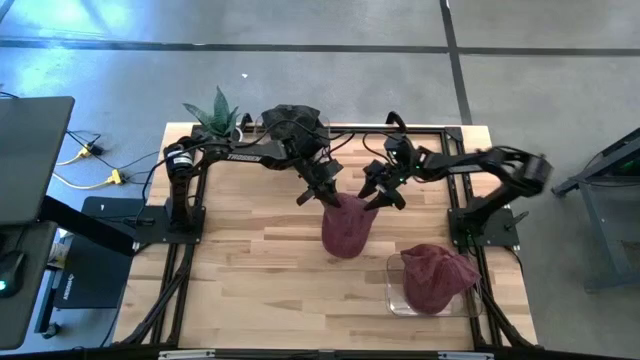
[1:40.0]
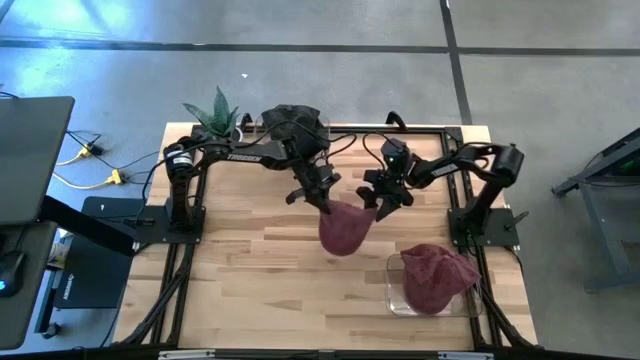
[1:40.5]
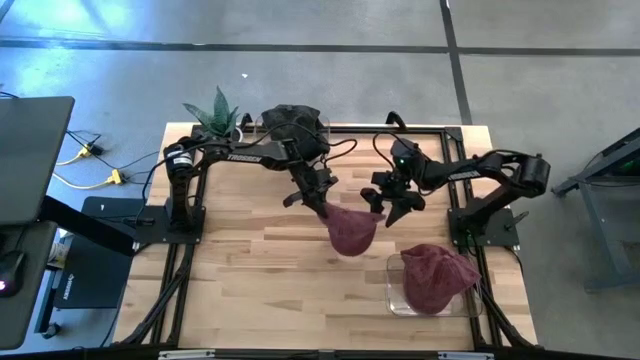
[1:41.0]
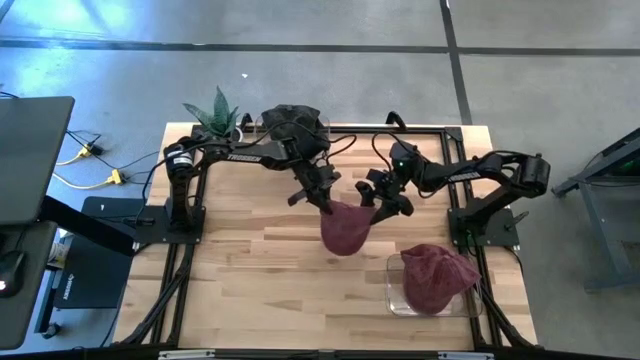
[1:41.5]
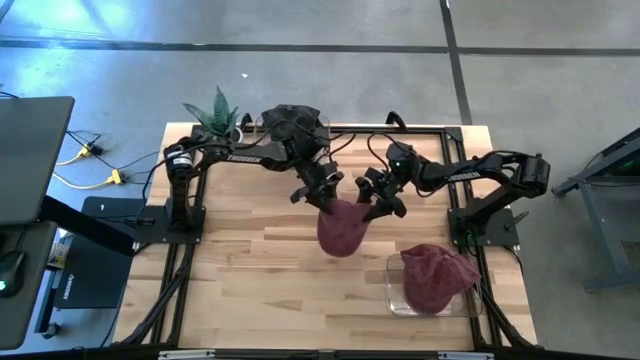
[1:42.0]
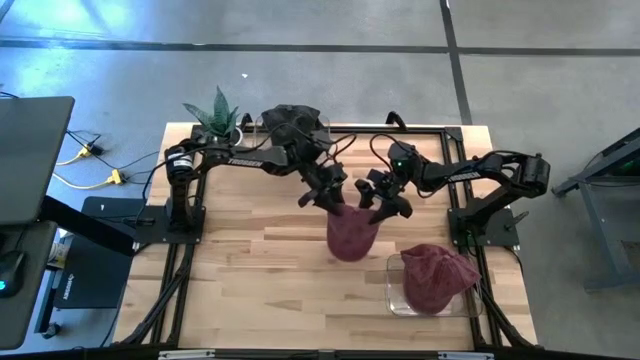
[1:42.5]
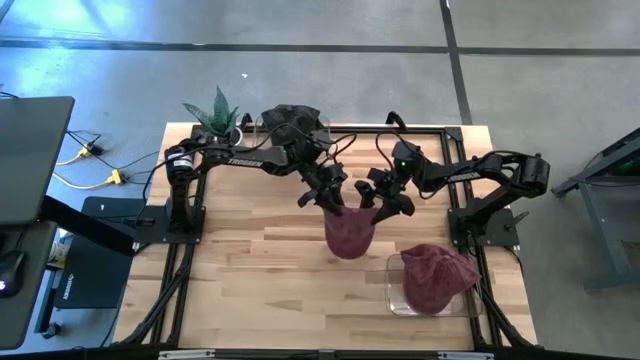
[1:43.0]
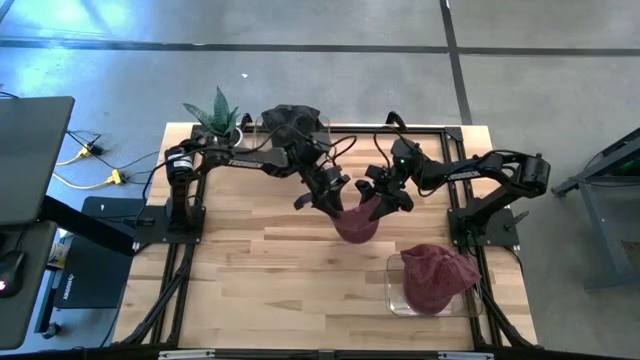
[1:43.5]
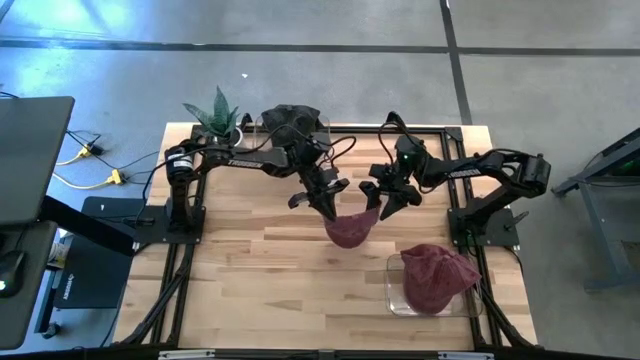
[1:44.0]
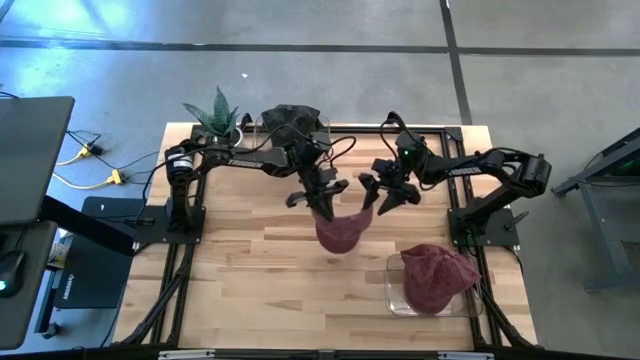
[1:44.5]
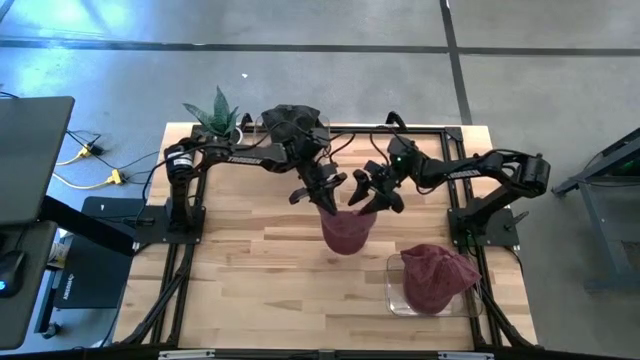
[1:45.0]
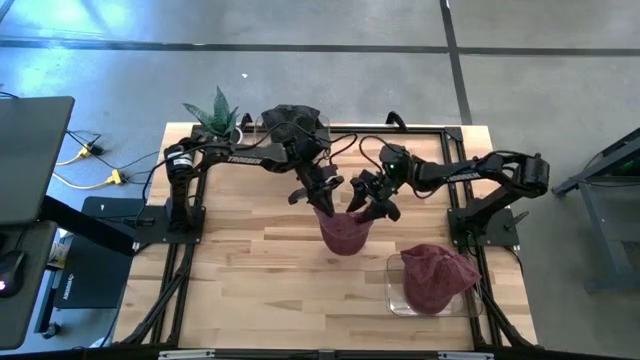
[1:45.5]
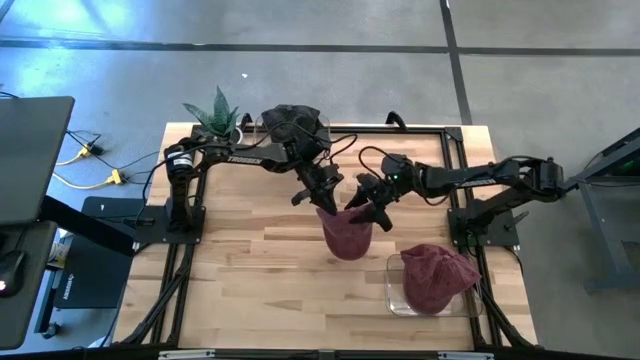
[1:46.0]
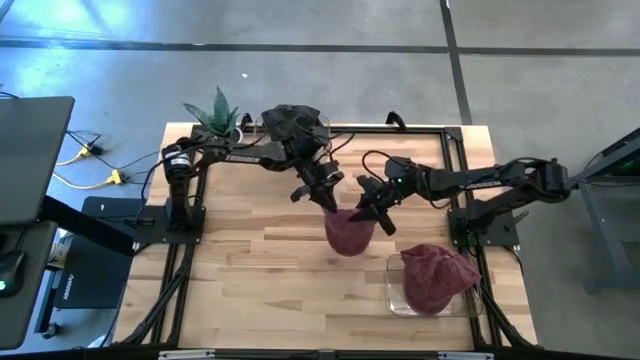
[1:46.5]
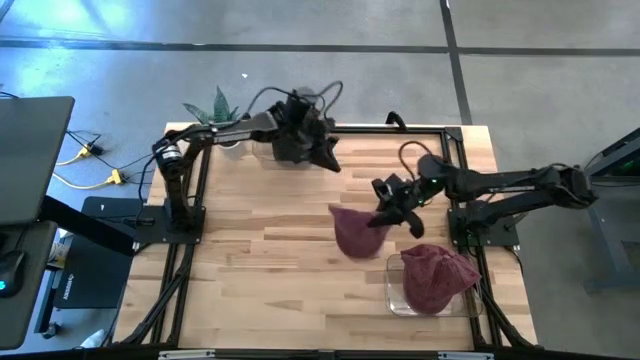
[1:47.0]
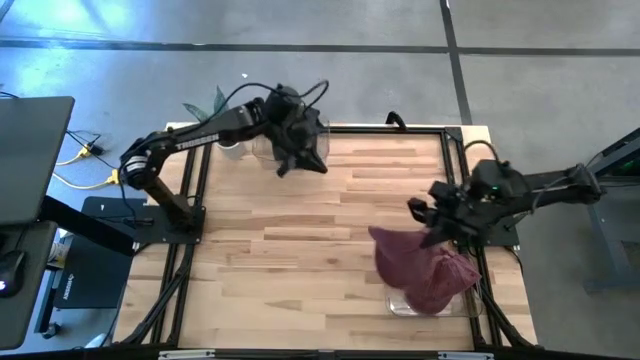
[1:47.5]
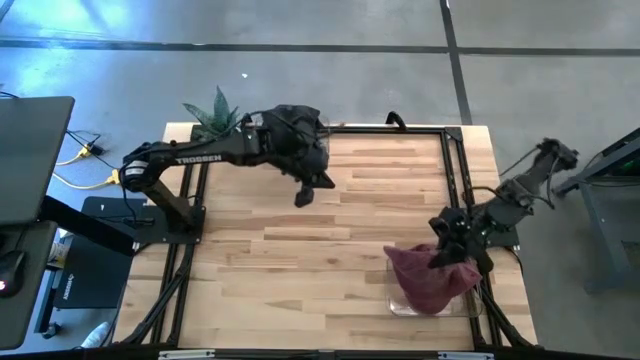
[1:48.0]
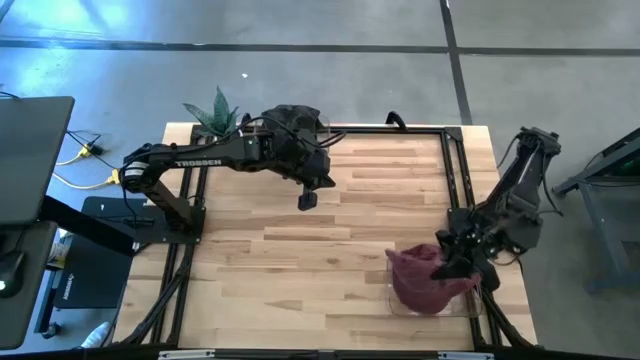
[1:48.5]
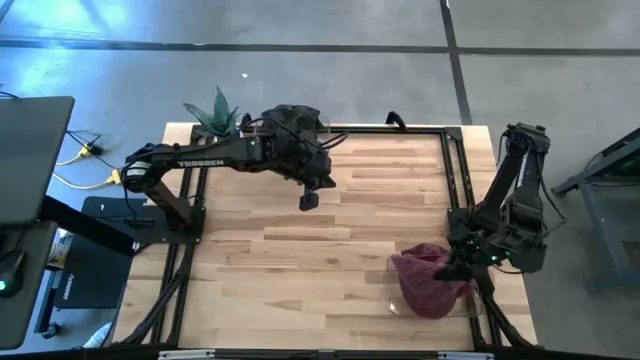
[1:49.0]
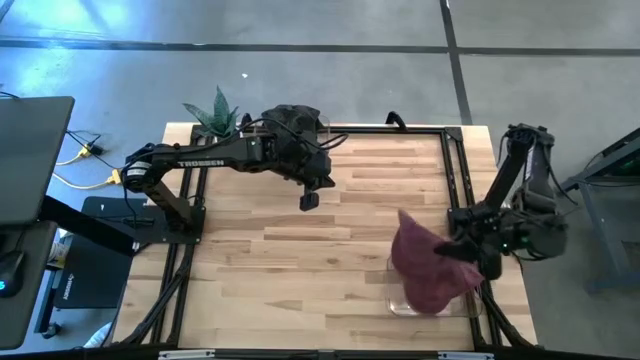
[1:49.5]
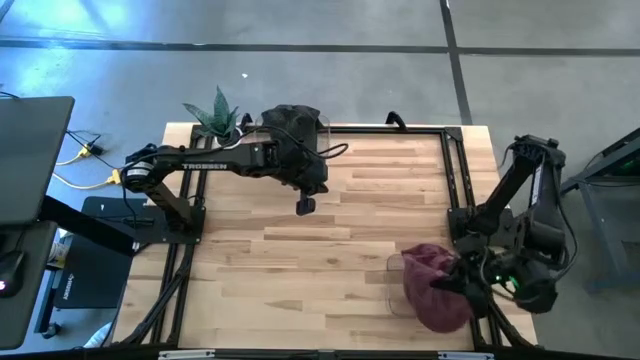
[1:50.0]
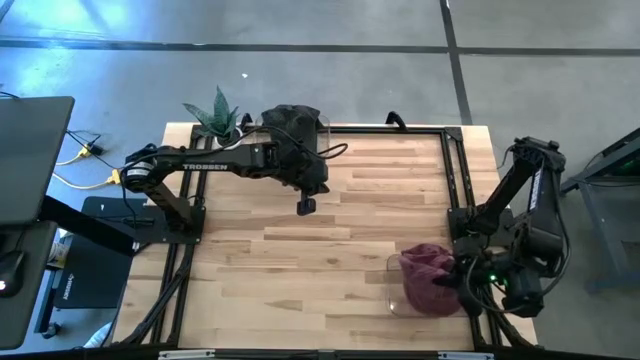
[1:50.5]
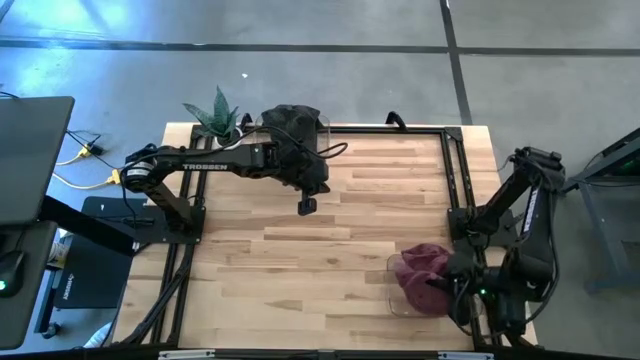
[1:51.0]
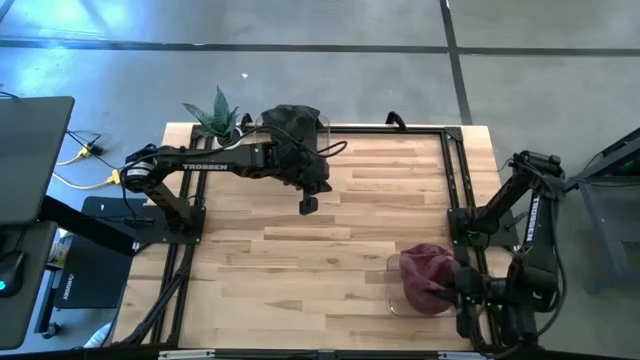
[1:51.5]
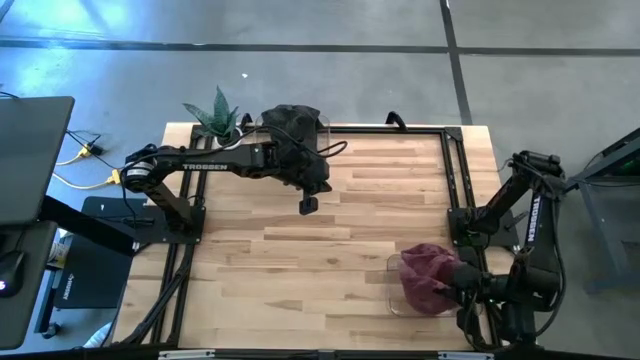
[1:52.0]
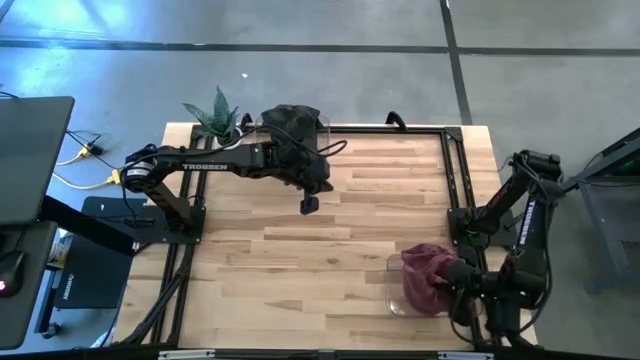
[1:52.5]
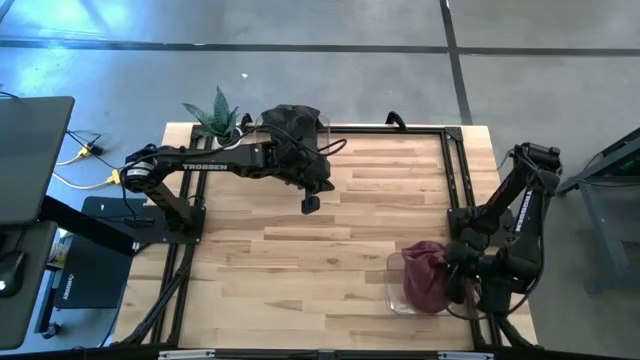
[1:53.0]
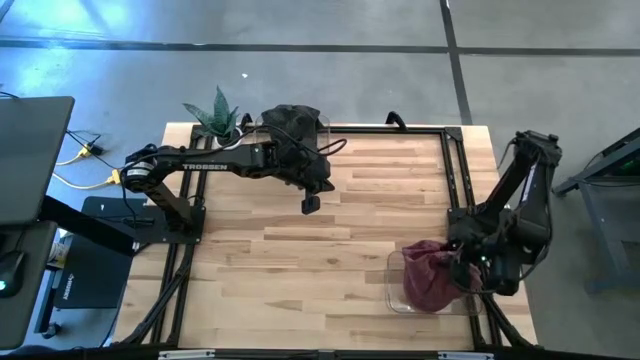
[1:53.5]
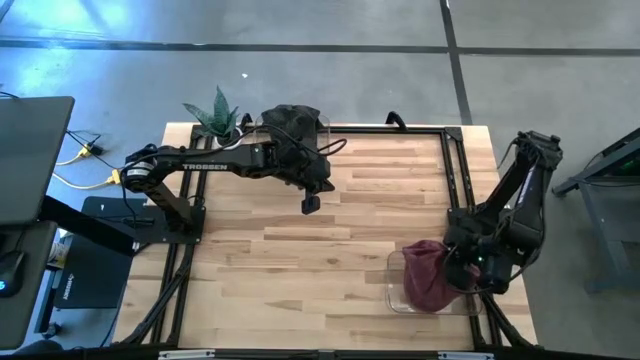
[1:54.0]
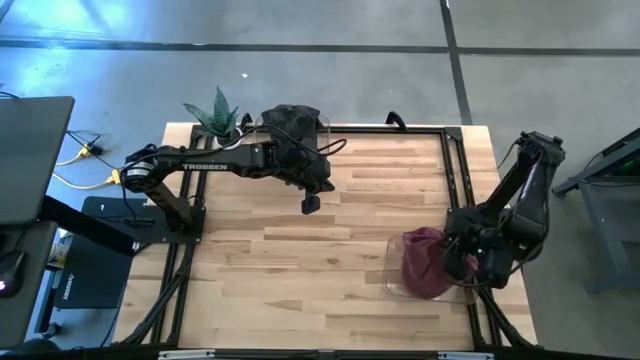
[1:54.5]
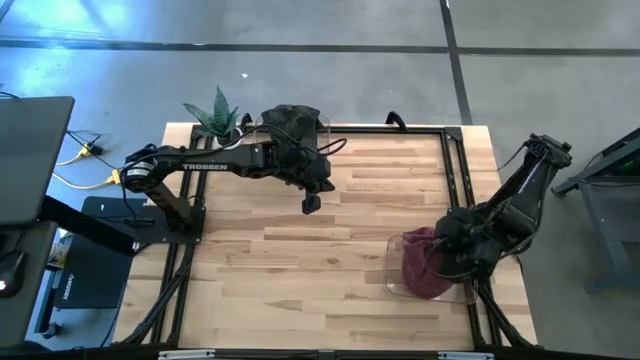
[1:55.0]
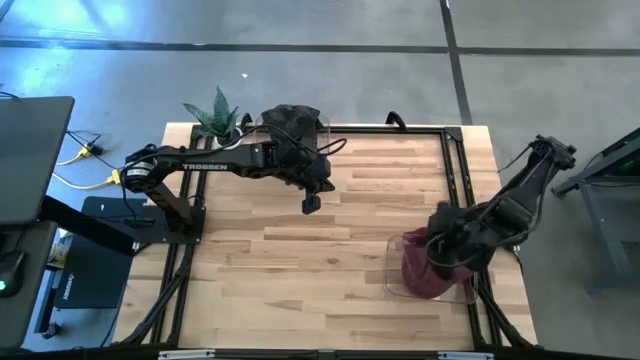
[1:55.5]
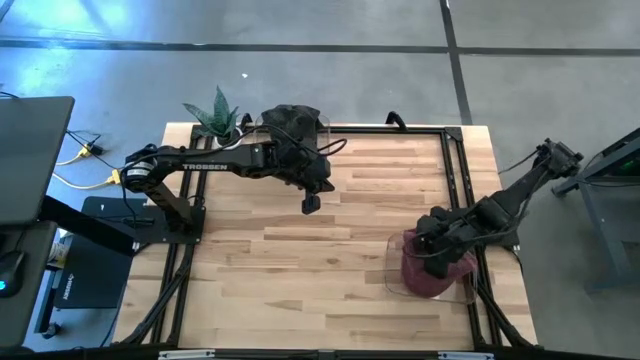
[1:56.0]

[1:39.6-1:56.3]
Task: Pick & Place hat
Put the red cap into the bottom transparent bin

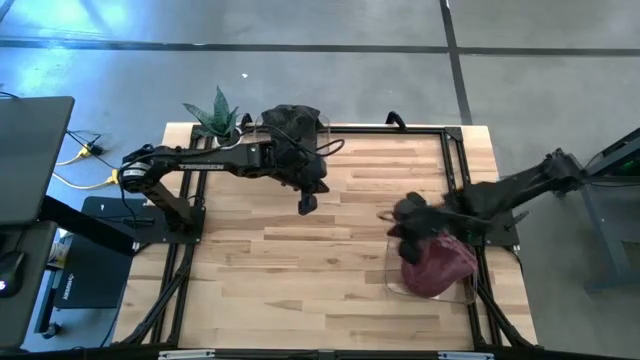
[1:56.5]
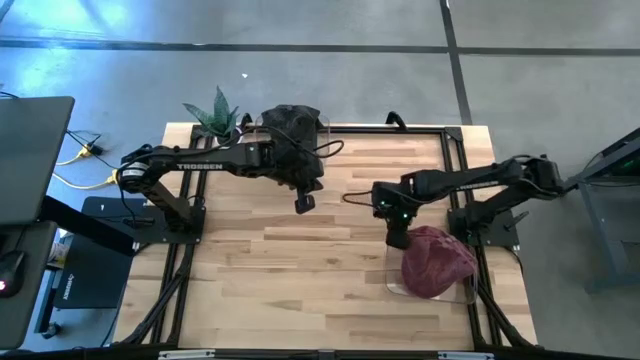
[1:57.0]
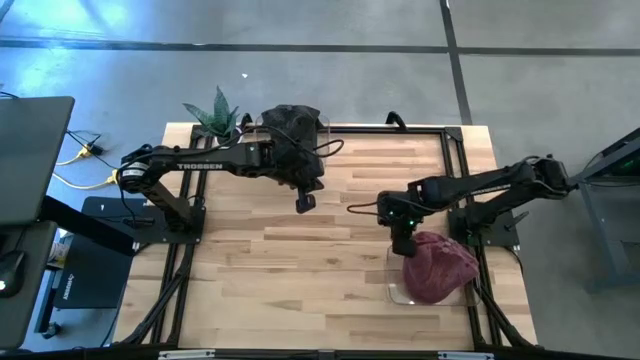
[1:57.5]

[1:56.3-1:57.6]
Adjust the bottom transparent bin

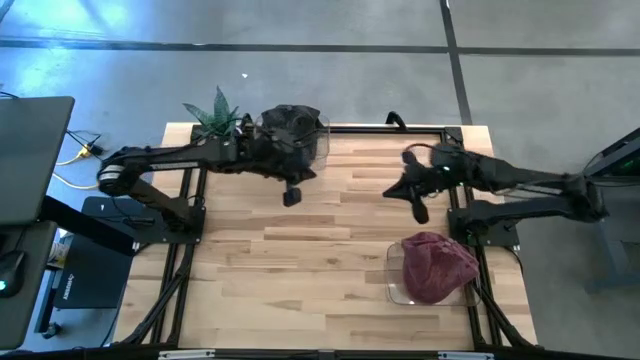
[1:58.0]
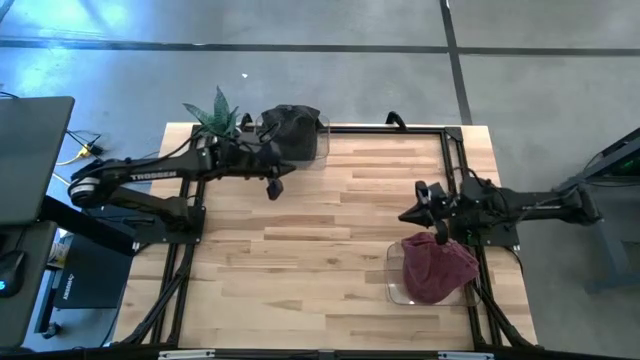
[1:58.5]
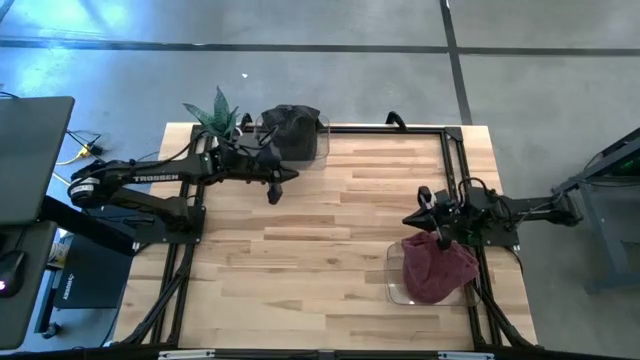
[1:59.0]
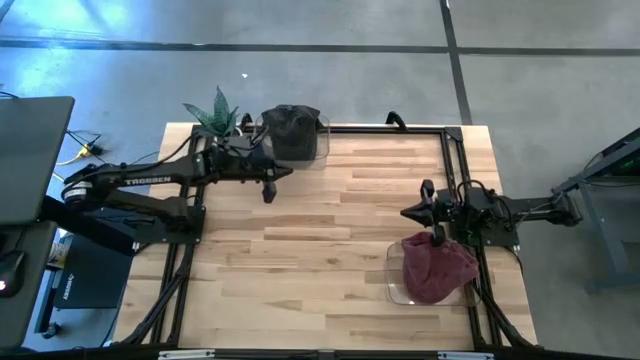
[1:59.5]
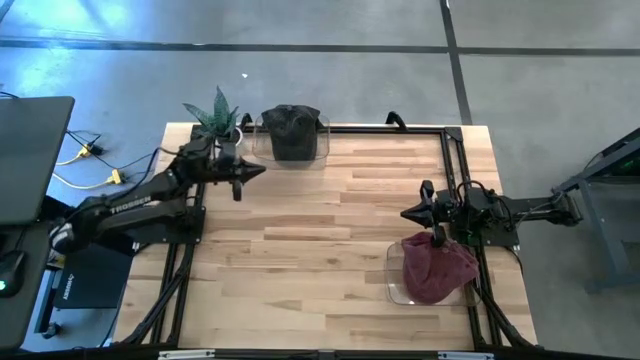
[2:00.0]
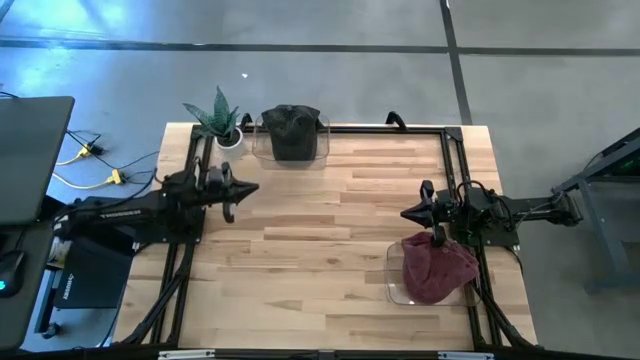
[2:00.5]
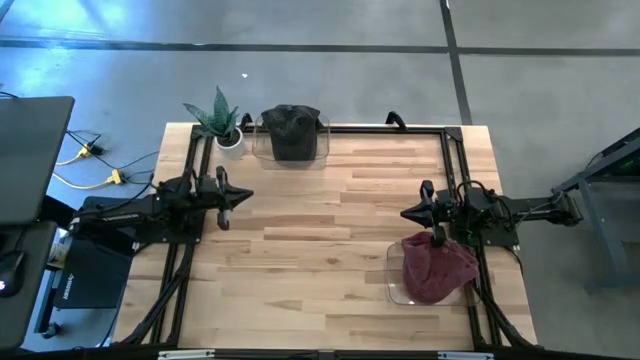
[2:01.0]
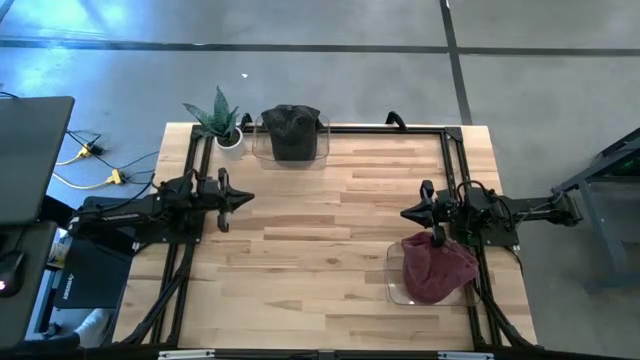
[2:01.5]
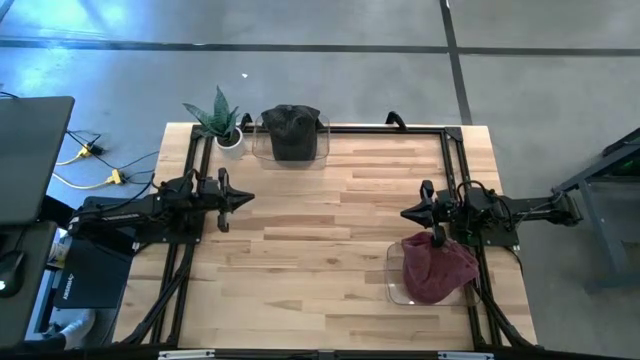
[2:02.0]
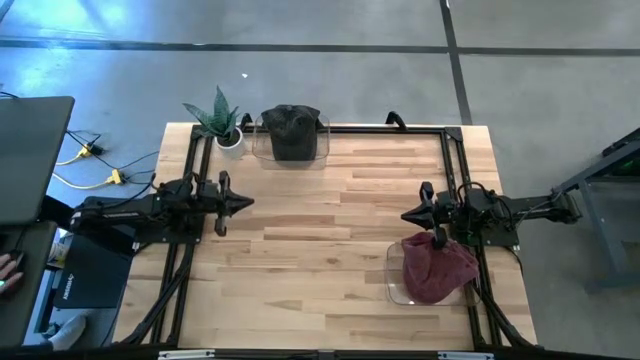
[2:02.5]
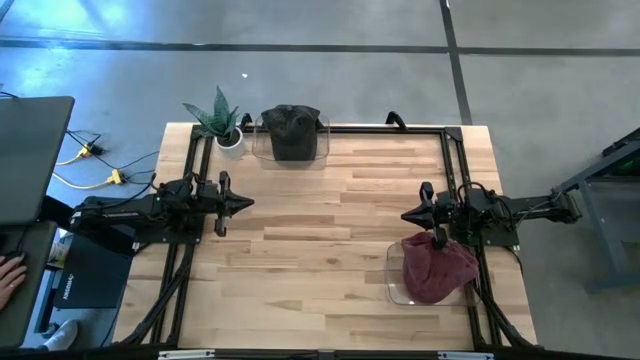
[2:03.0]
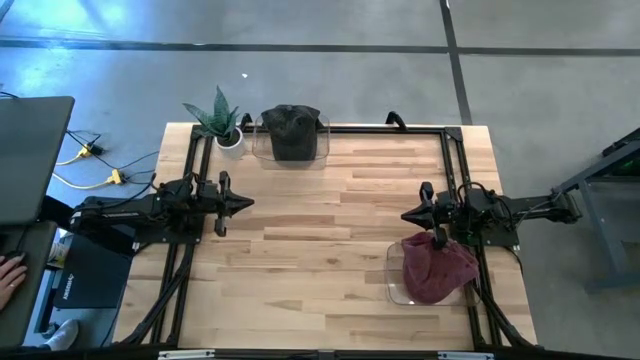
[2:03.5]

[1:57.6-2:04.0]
Return to Home Position
